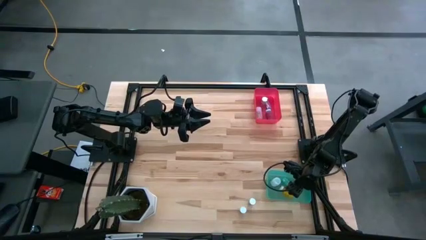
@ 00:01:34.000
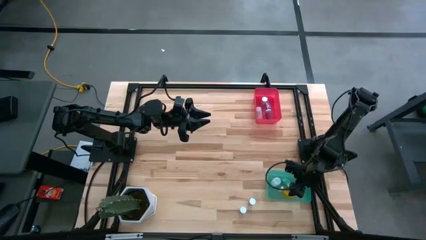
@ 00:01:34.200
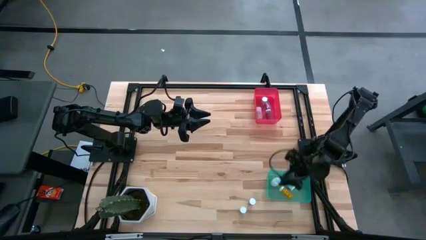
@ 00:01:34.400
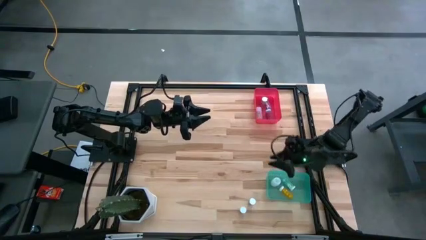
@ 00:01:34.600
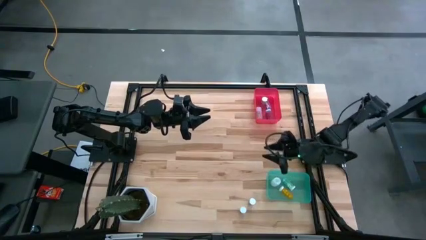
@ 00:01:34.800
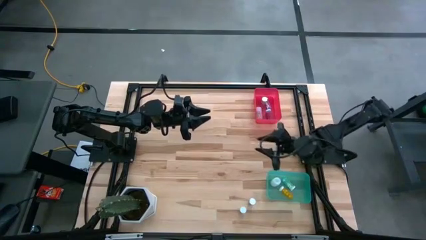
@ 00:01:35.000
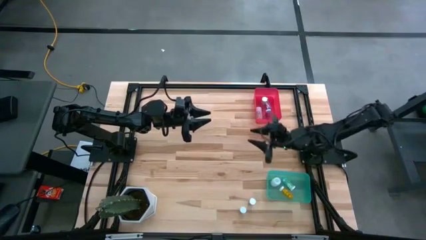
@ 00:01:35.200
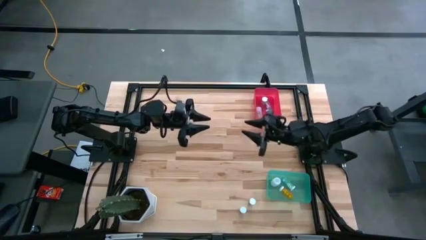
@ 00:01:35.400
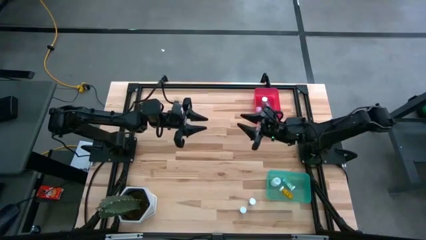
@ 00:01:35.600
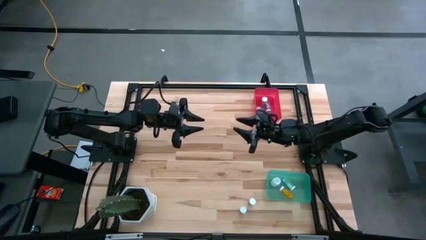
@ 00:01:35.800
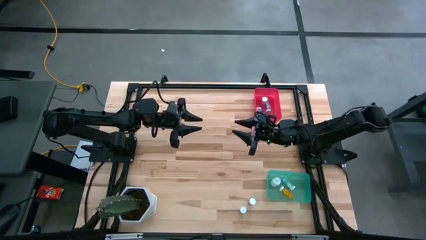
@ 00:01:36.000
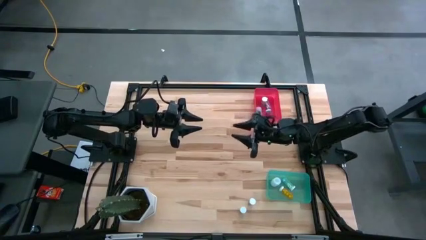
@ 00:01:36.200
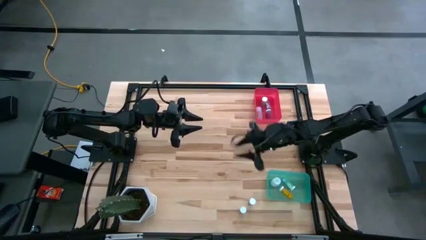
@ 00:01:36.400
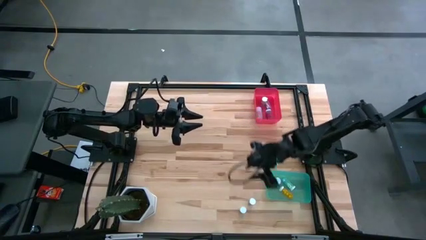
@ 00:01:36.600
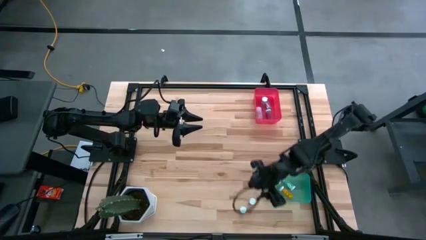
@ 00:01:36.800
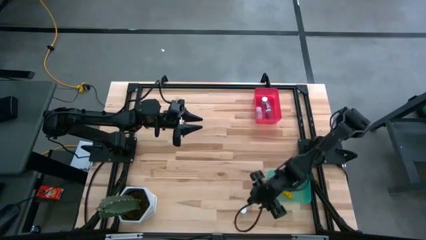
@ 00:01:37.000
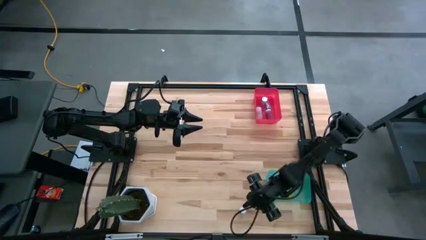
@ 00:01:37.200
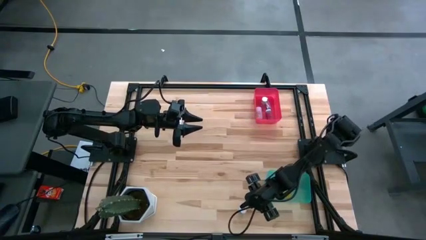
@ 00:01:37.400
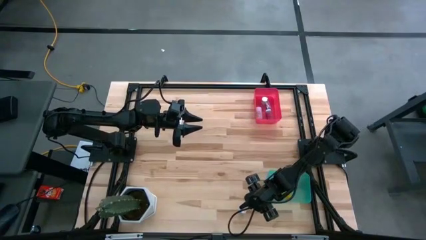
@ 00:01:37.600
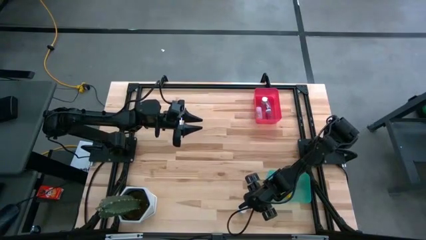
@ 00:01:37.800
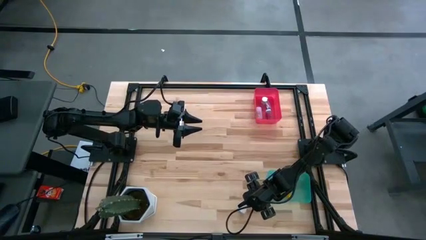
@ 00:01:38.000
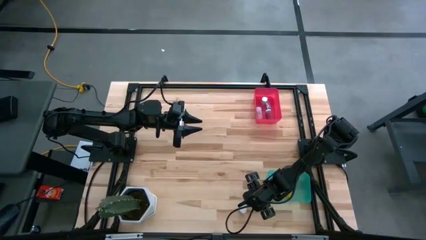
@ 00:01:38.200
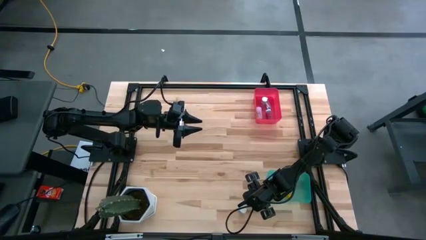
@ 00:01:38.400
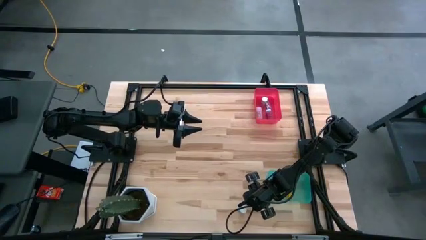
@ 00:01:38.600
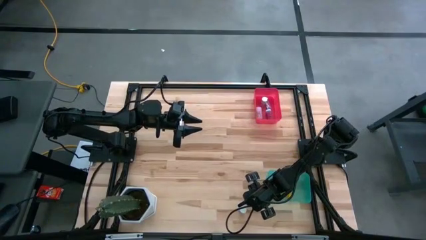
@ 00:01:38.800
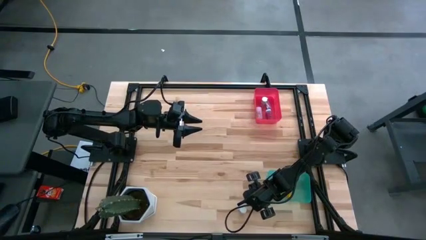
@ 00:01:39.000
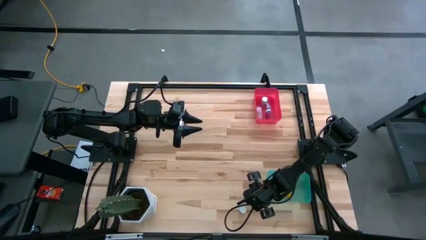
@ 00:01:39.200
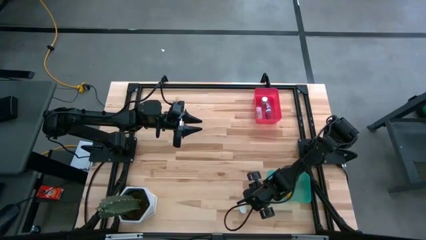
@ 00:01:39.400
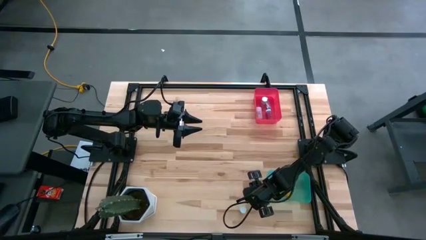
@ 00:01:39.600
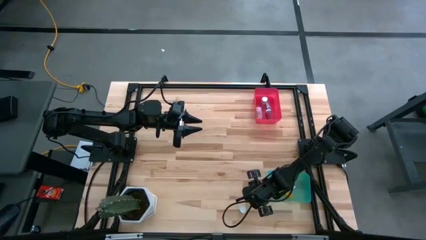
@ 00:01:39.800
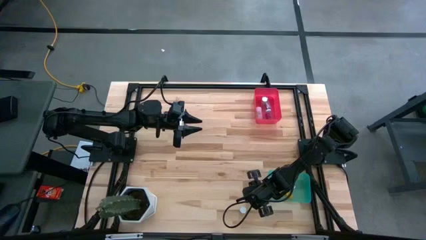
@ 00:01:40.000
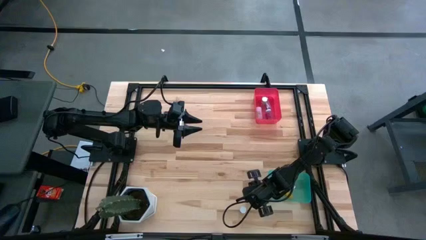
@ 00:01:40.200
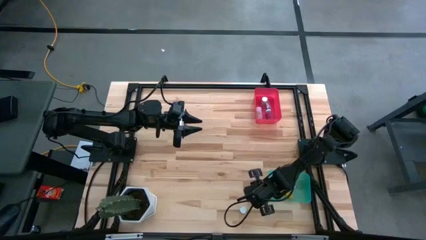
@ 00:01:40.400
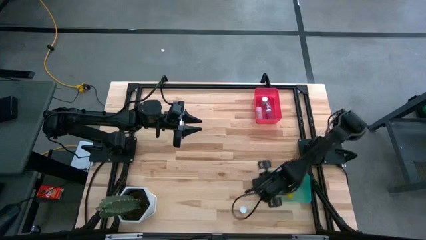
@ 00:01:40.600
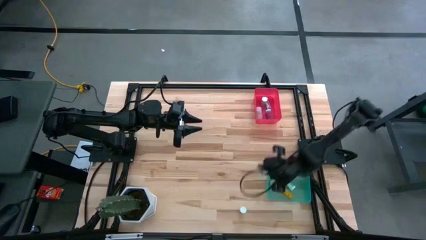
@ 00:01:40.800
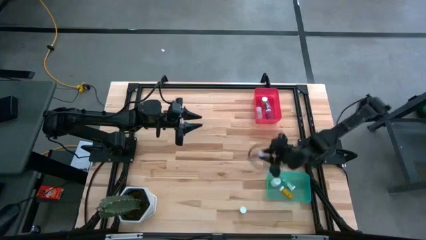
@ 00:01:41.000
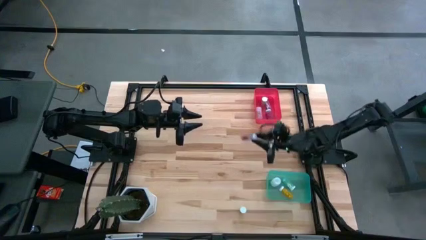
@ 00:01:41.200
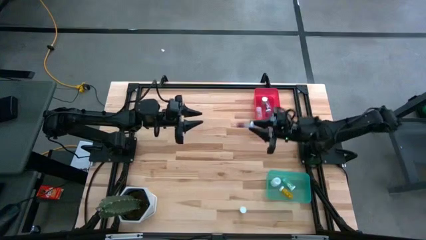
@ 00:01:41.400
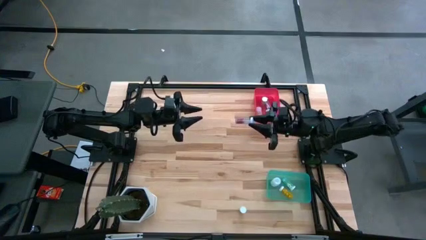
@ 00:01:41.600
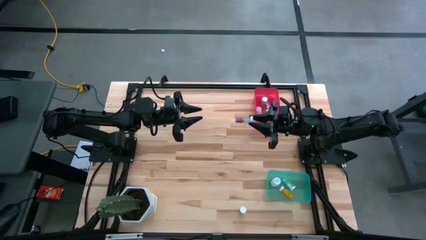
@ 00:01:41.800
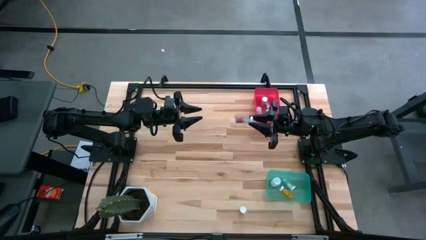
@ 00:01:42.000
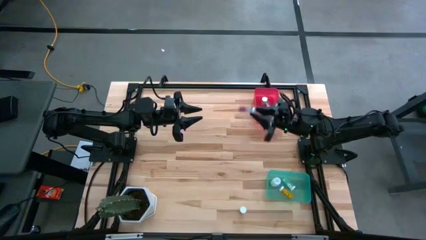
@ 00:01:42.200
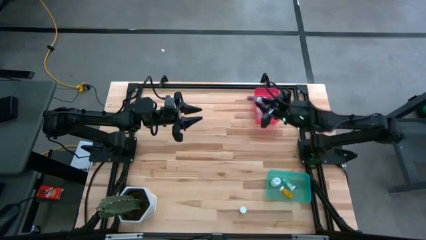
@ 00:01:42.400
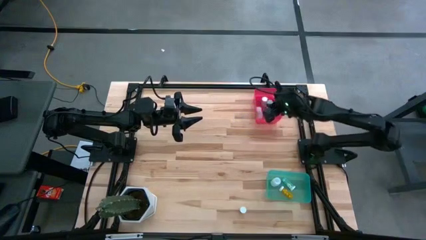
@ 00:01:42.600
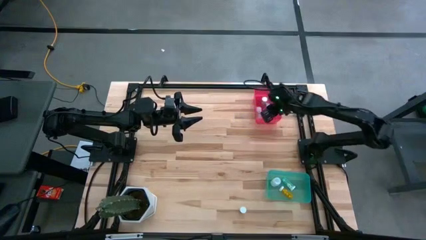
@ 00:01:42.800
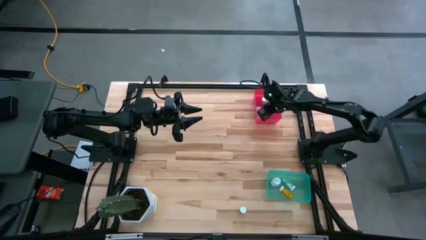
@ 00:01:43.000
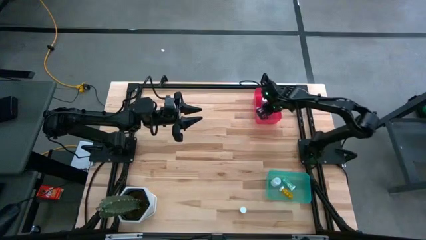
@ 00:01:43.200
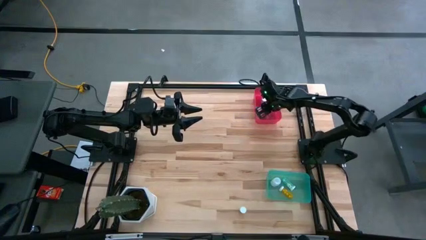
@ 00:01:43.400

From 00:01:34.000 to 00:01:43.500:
Task: Pick and place medicine bottles into bin by pill shape (circle, oval)
Put the blue capsule bottle into the red bin

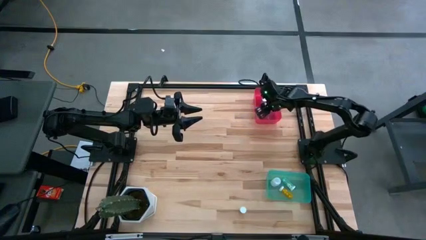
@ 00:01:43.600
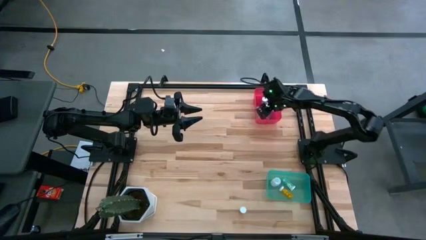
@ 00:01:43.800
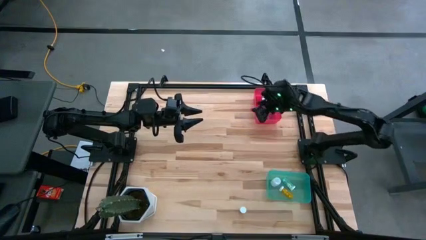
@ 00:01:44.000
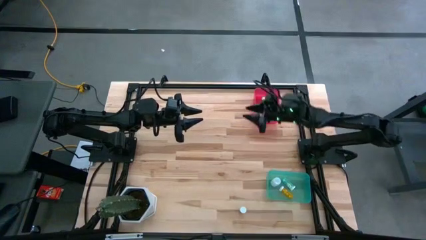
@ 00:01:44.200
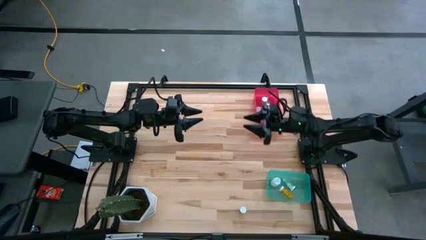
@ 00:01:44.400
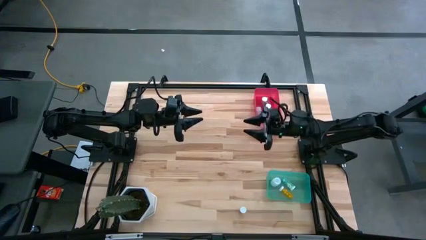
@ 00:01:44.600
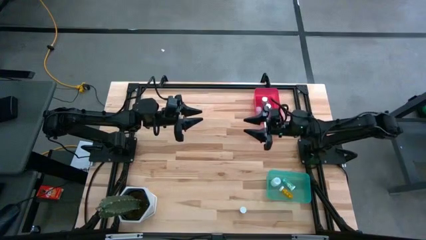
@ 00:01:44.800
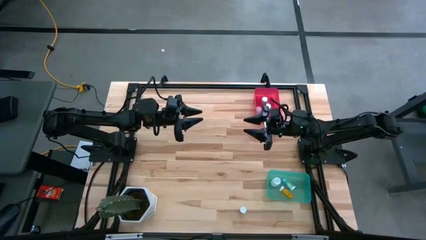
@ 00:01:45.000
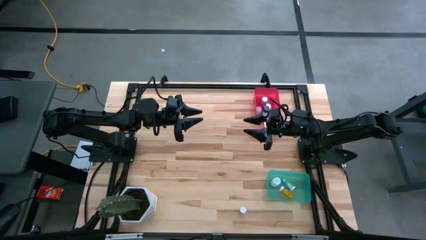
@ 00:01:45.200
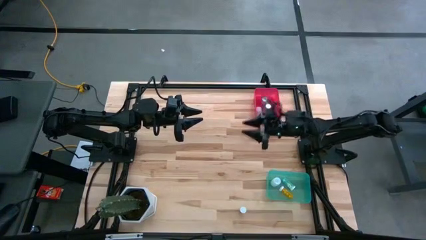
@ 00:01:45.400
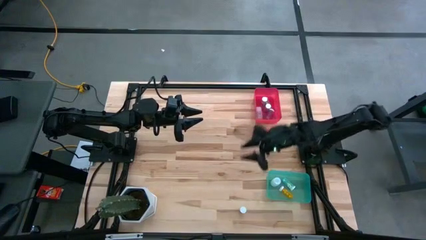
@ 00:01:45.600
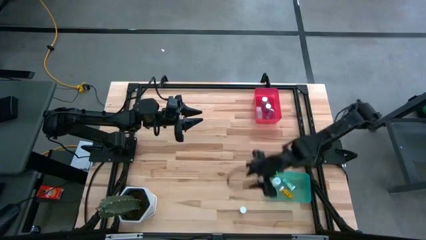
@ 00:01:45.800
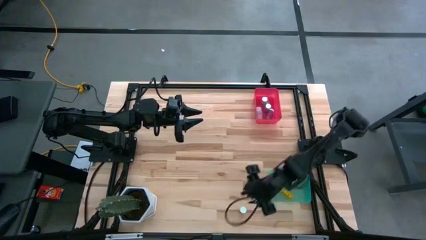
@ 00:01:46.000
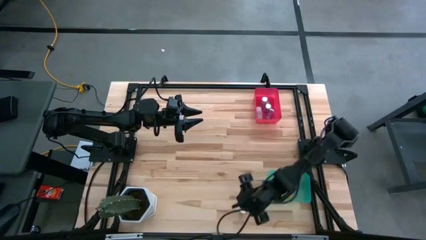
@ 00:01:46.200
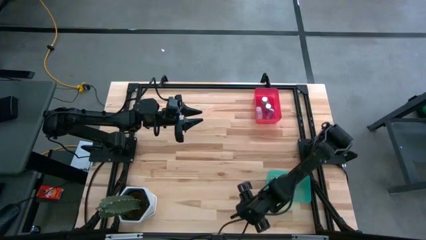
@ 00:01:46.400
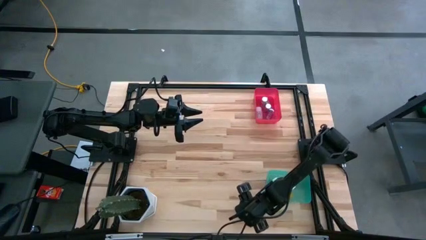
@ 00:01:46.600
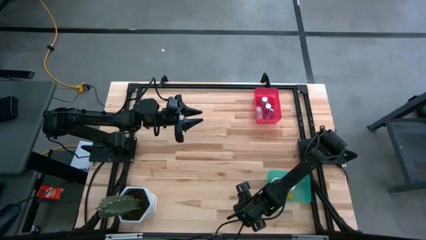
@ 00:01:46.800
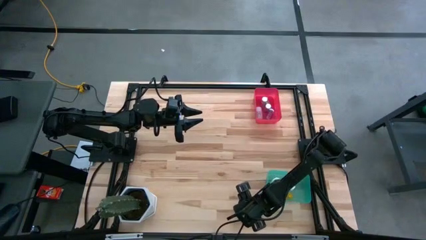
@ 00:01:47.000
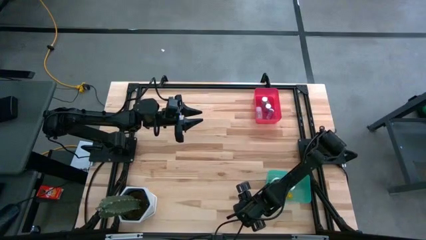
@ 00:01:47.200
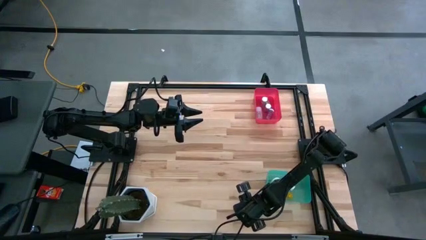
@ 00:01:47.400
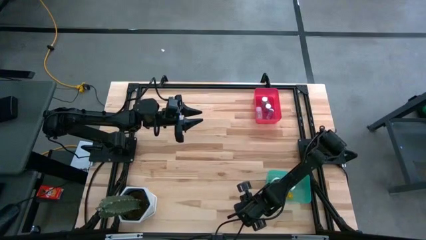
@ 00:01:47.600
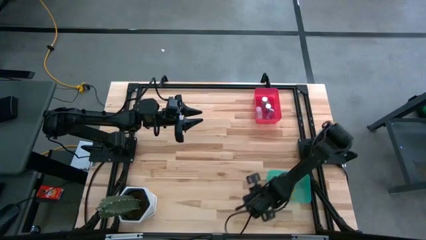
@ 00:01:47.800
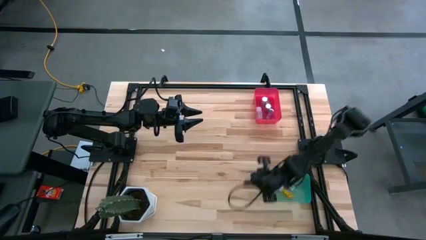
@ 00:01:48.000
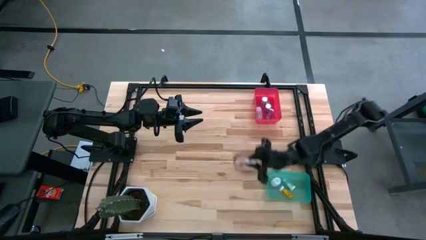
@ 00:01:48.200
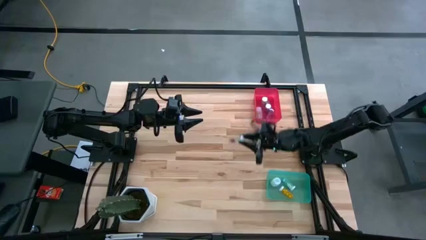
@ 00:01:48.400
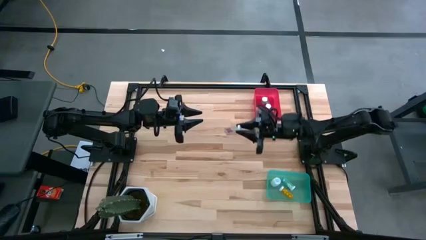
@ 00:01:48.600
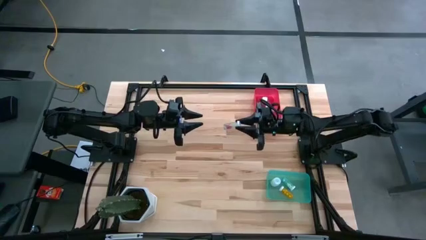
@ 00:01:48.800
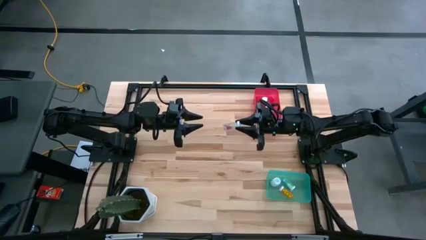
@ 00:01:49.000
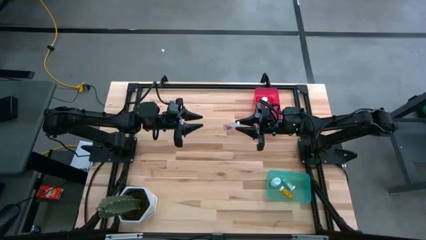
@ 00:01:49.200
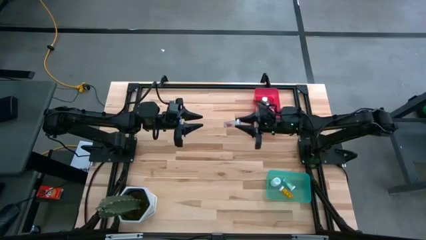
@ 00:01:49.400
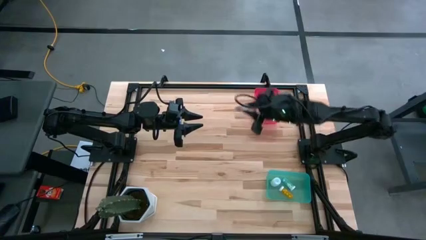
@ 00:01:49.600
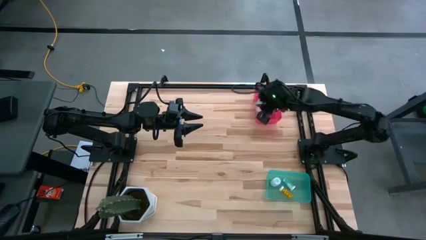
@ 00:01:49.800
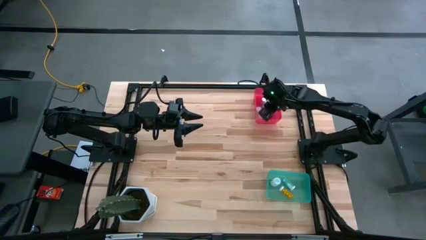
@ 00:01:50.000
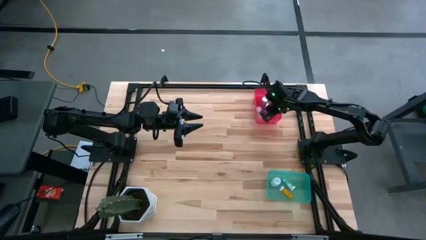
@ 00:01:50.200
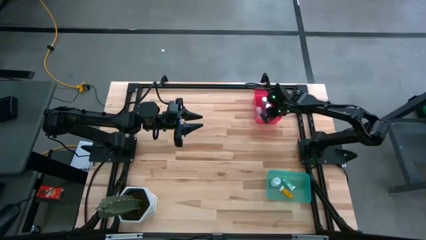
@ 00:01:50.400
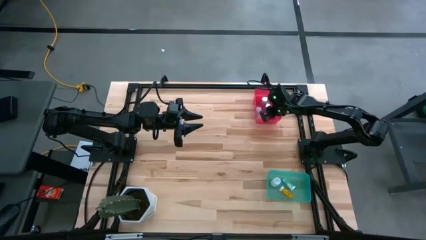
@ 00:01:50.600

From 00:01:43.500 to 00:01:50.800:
Put the blue capsule bottle into the red bin
